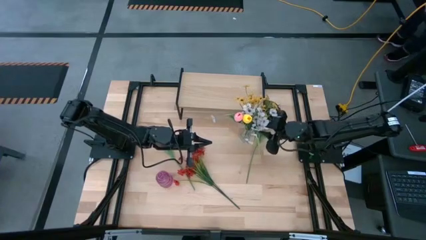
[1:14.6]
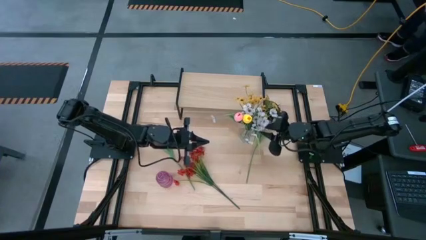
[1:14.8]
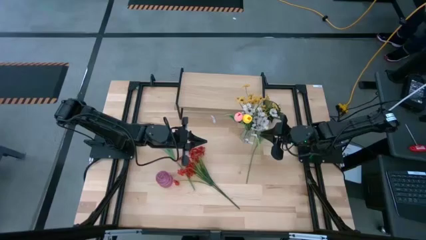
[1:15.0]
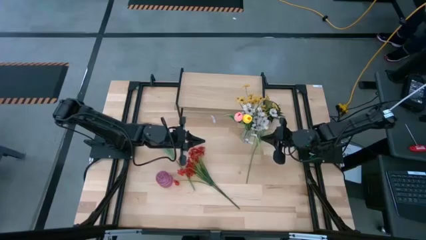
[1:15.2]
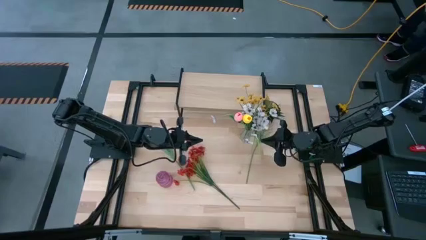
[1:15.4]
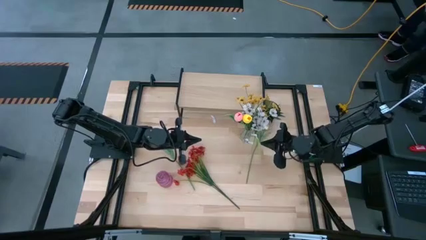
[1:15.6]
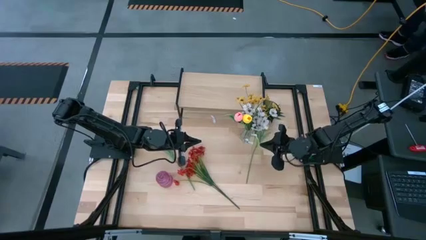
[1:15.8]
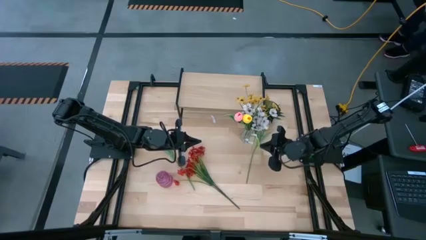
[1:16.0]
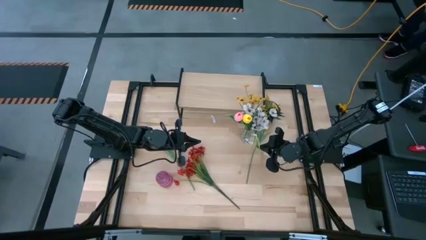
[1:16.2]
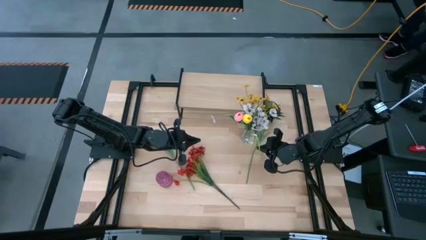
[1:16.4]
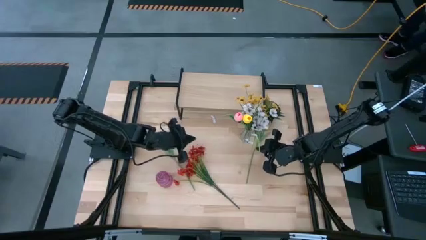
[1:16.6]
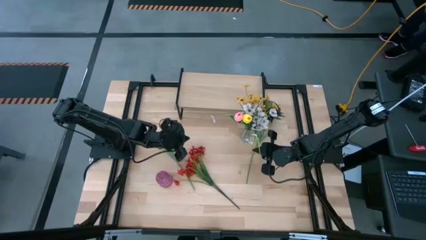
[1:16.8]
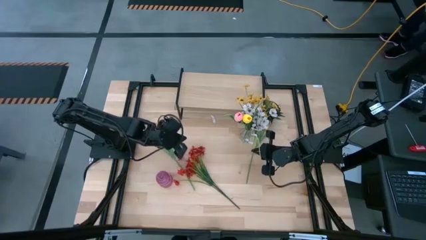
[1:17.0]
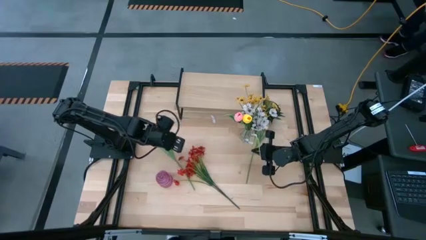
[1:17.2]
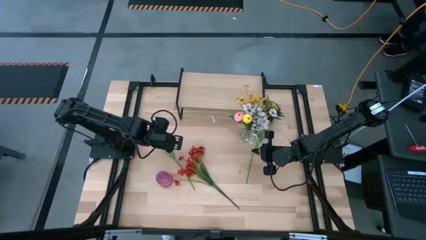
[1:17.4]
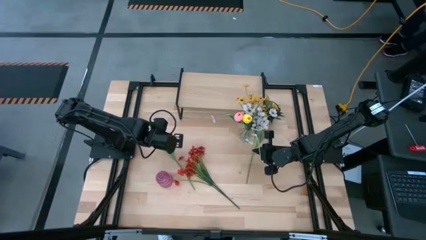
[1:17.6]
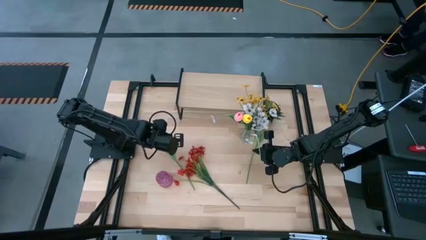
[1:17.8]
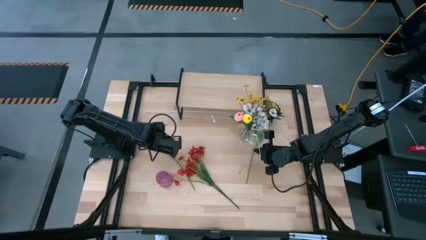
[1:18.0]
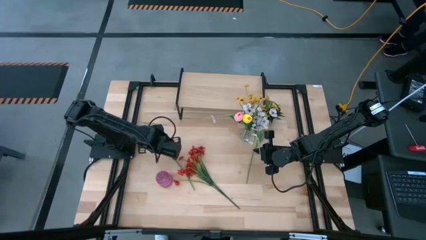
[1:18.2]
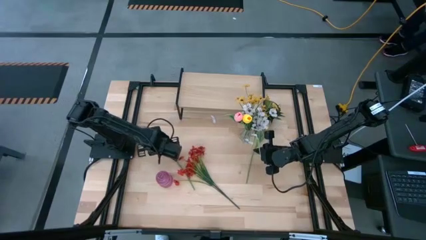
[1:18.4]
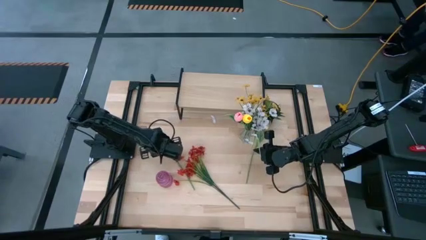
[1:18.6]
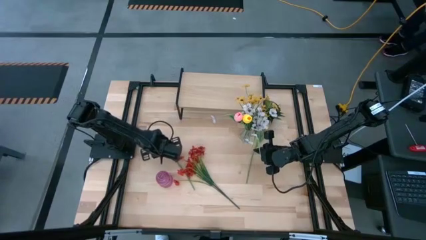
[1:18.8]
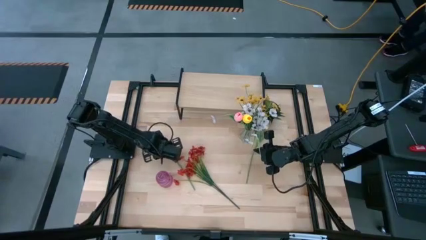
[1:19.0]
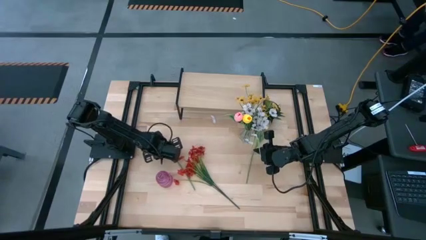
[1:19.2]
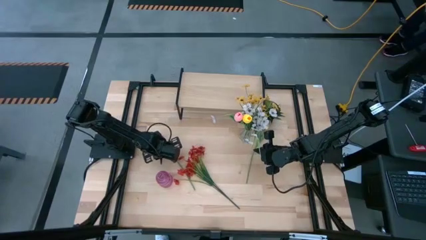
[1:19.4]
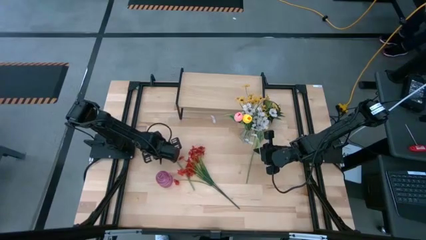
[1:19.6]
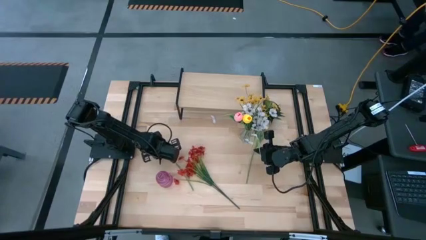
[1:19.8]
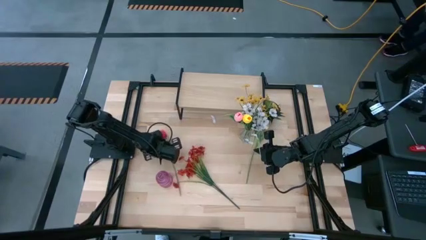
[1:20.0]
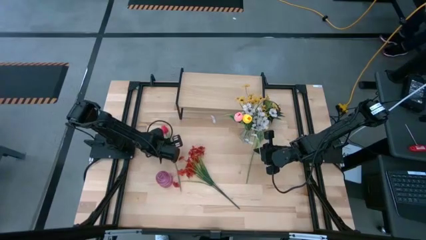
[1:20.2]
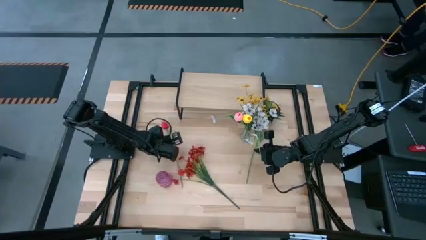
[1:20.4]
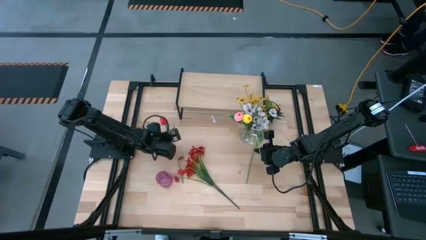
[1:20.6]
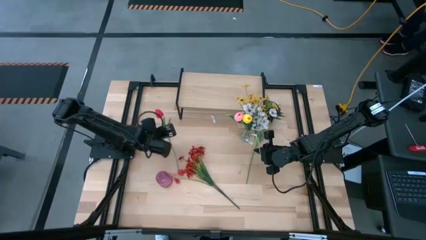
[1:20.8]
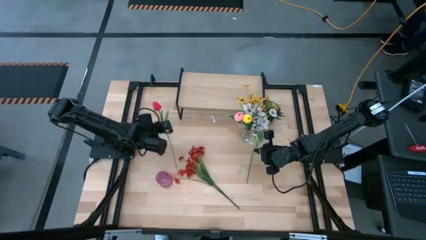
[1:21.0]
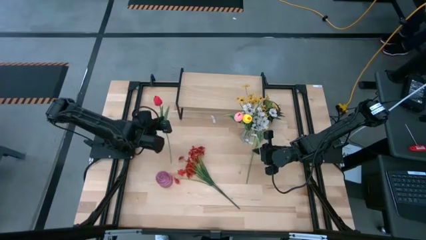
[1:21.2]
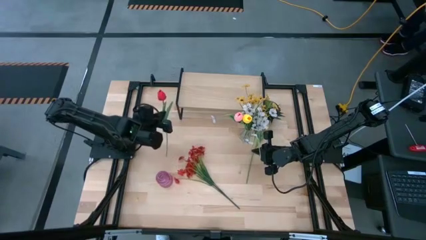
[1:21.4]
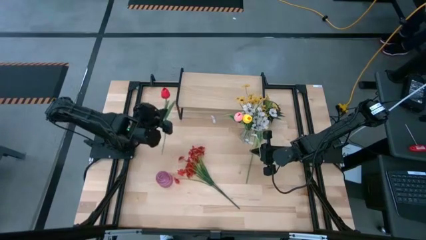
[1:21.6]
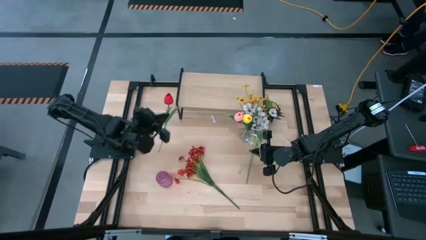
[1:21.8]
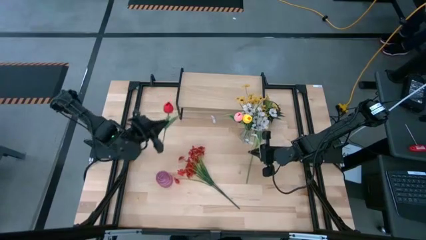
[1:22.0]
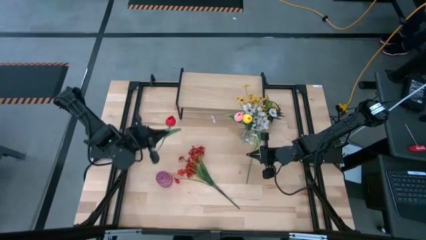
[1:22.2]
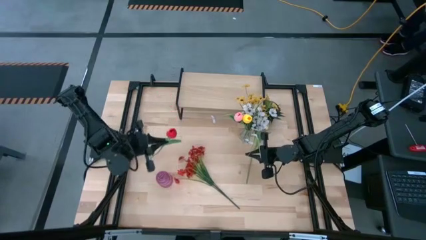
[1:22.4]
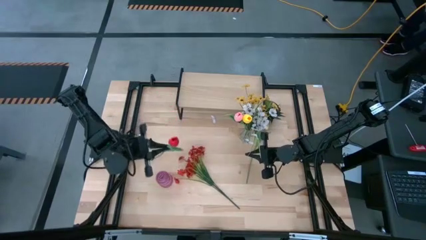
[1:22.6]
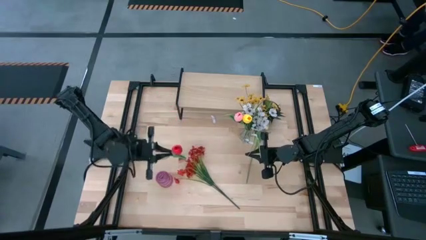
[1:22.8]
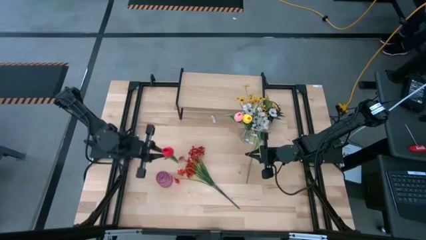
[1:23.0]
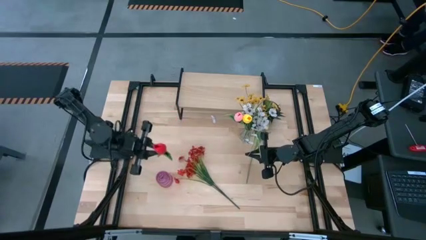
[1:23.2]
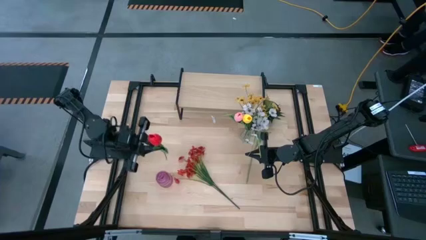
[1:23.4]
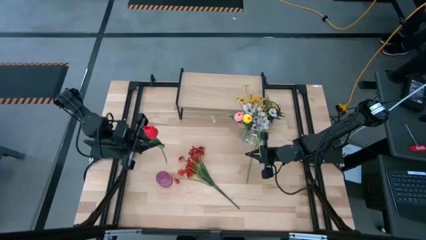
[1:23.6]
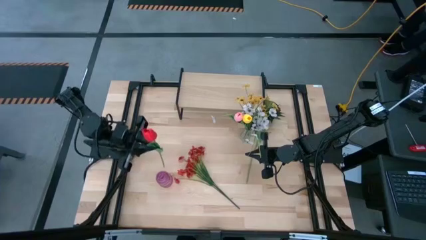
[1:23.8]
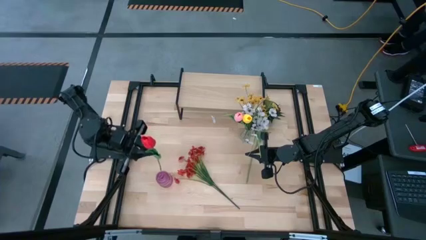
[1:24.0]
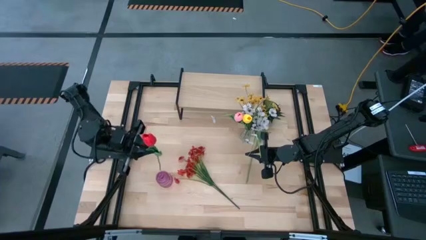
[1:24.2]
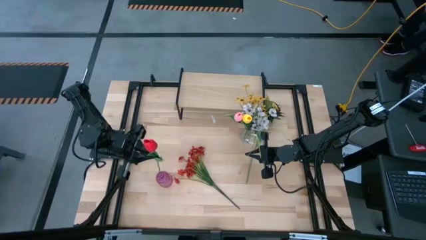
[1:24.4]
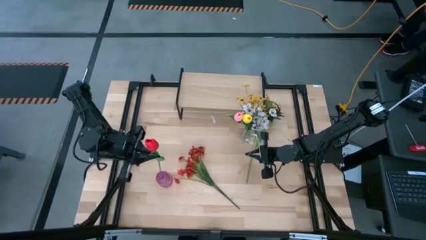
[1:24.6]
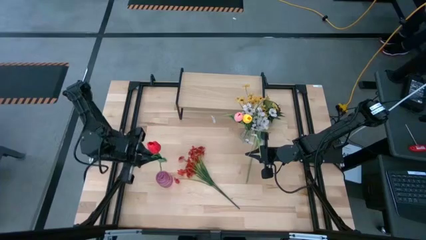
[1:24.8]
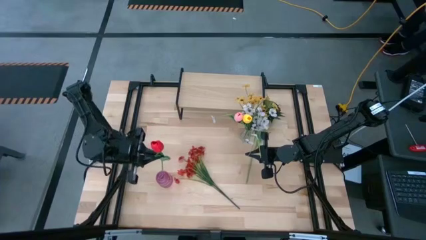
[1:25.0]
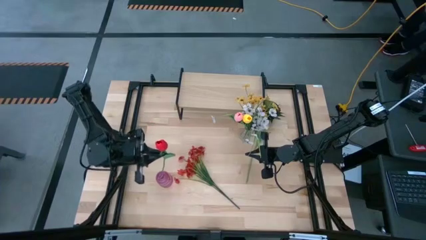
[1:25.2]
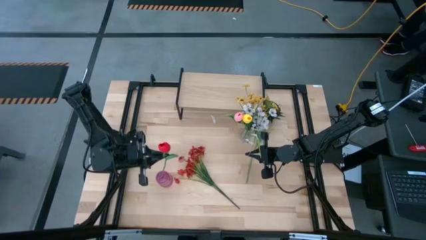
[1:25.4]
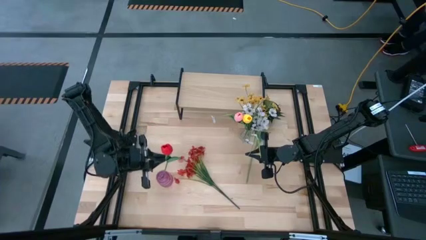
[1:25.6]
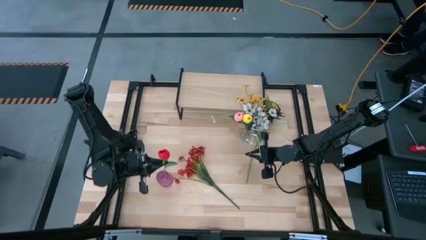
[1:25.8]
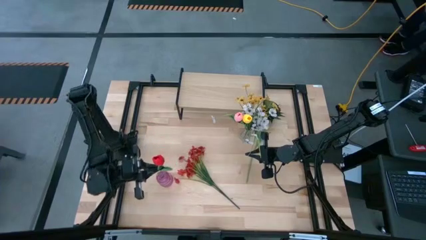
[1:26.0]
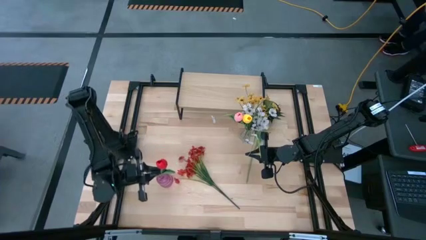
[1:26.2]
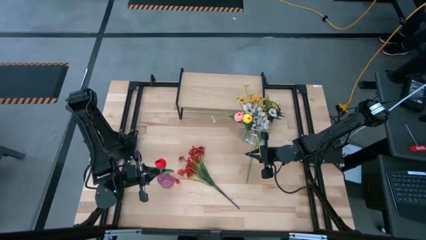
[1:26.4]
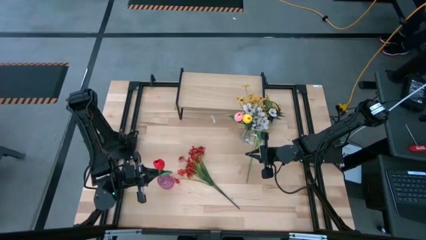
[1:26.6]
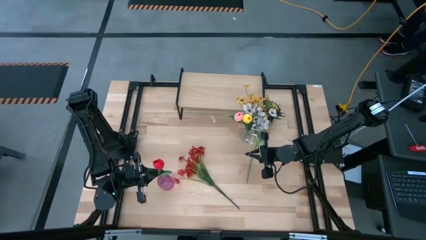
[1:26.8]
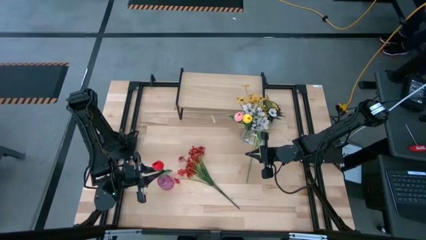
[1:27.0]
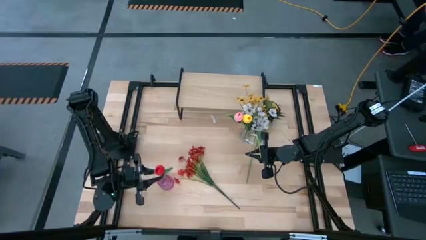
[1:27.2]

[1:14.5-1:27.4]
Task: Pick and place flowers into a vace then onto a shelf
Put the red flower into the violet vase

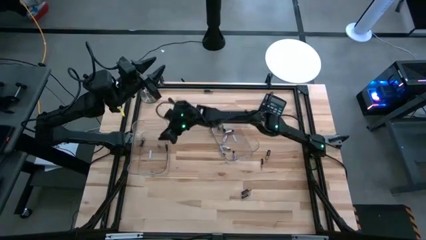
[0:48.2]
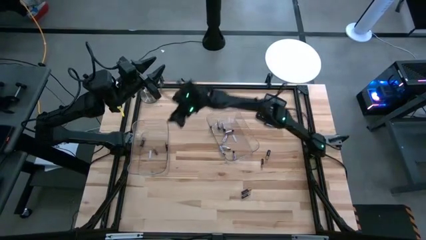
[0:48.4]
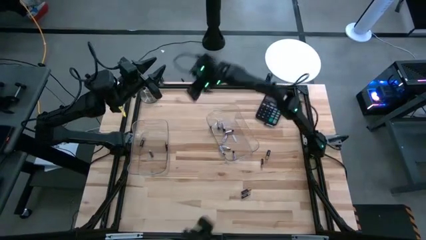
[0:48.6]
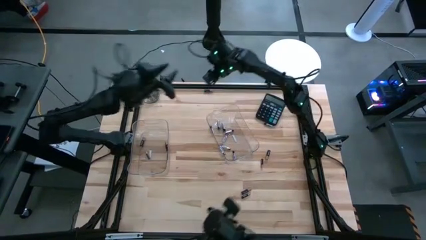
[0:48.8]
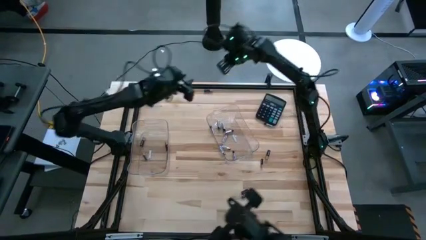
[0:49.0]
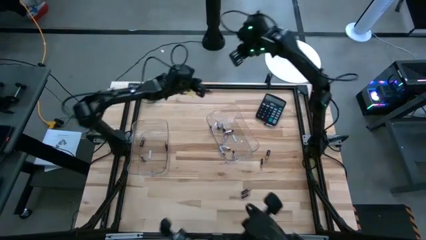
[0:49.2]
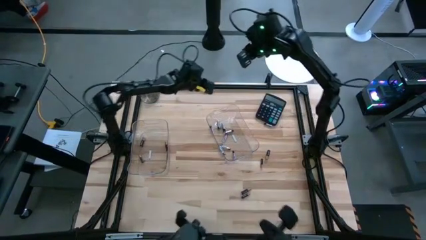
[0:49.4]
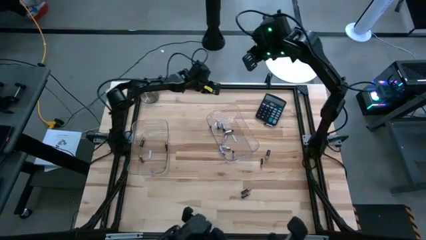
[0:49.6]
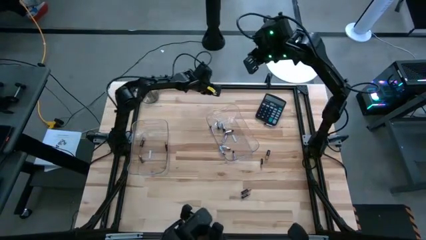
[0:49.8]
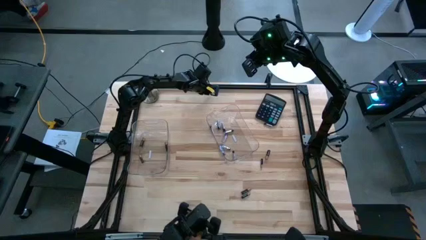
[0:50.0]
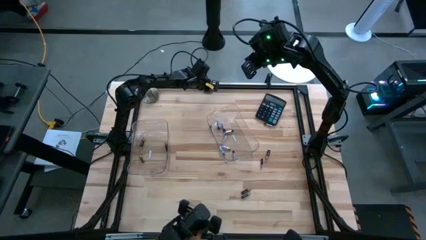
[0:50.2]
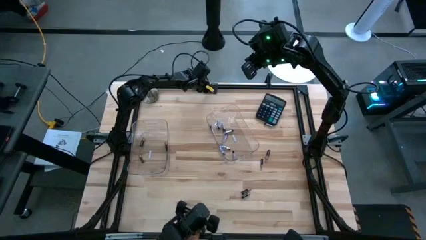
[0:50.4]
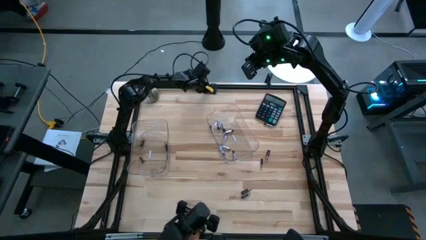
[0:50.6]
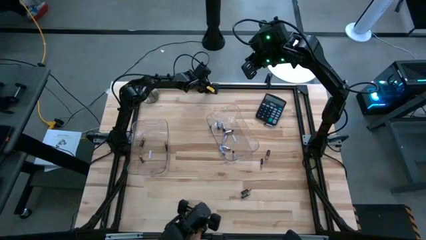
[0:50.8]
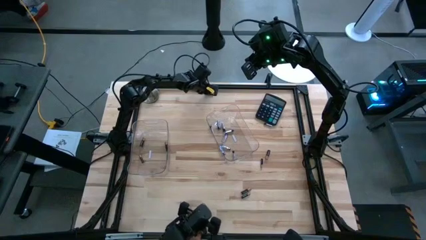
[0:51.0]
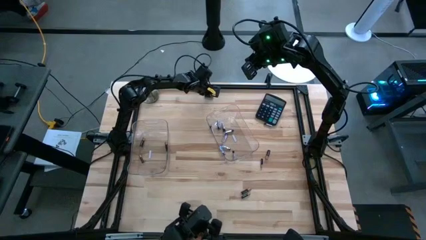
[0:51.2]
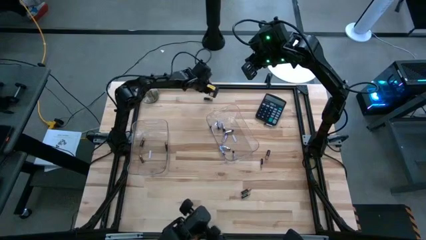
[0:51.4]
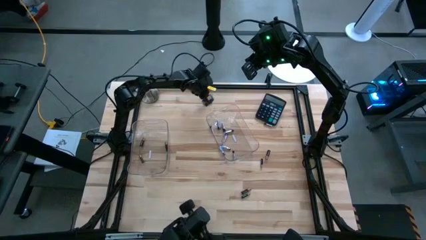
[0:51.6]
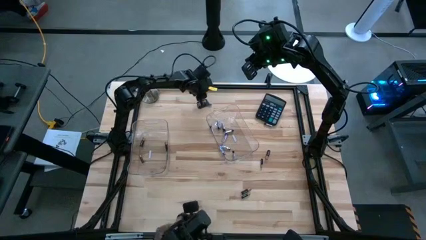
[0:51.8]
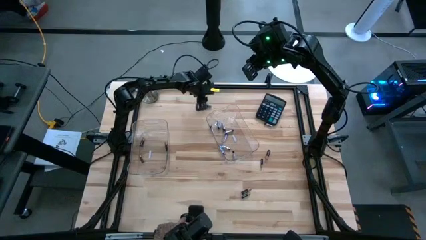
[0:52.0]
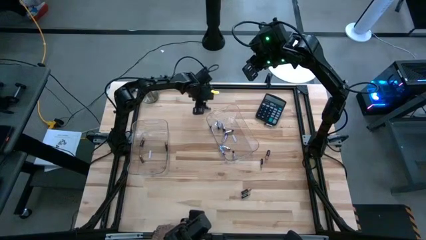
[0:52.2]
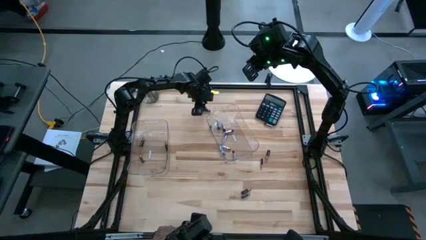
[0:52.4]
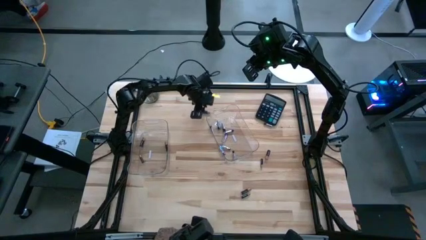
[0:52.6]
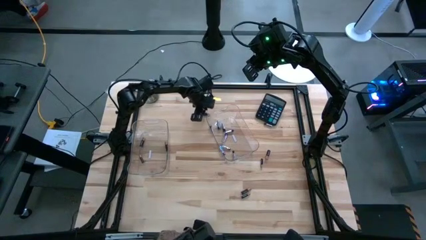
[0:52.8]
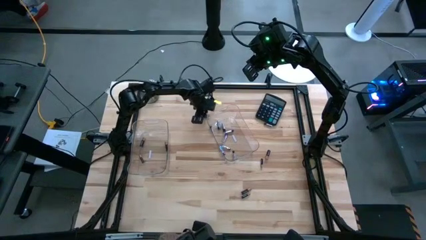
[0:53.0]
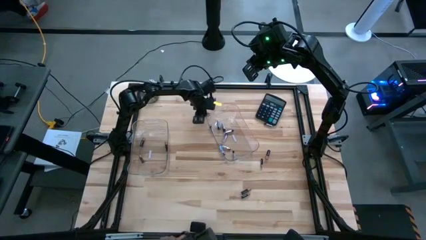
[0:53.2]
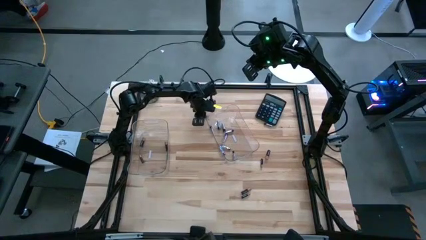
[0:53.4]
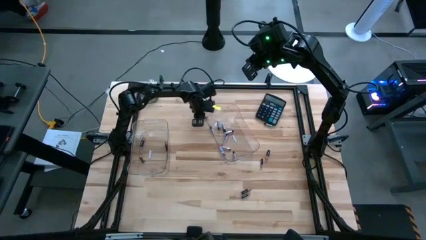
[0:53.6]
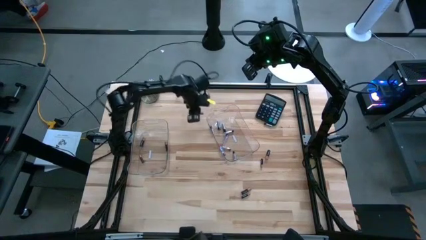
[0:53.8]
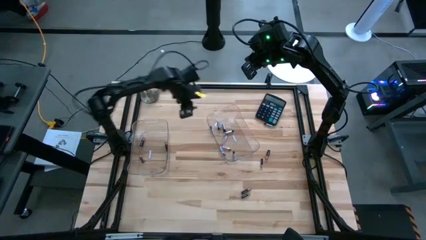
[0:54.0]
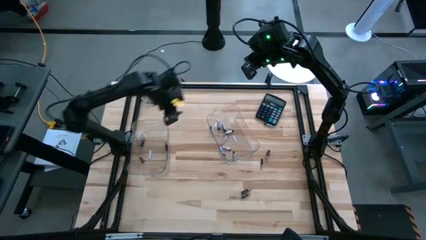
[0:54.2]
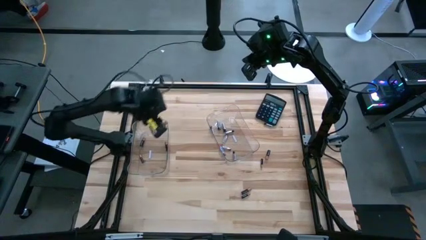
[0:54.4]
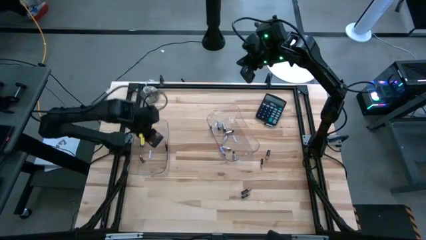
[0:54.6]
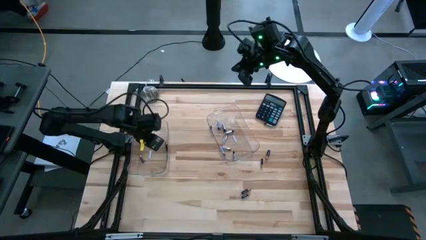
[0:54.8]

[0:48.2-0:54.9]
Task: Sort batteries
Put the black battery into the left transparent bin
